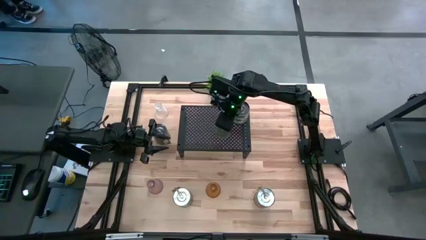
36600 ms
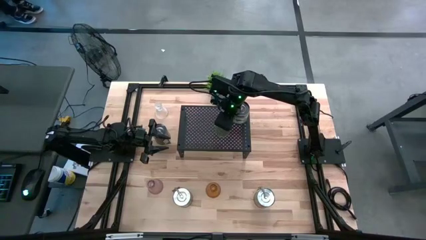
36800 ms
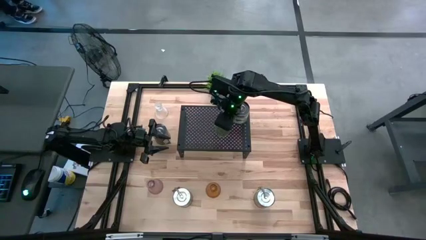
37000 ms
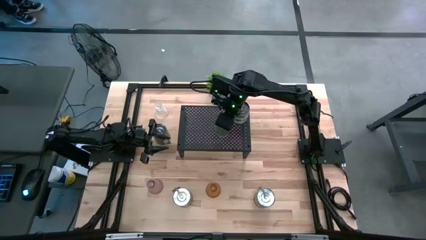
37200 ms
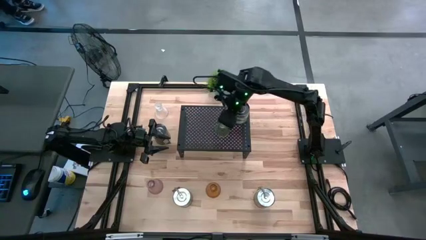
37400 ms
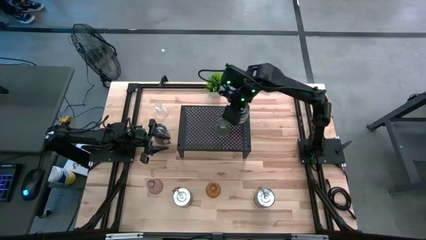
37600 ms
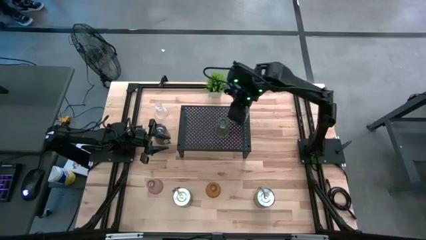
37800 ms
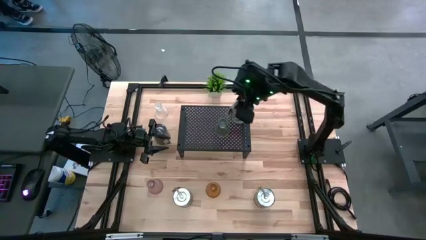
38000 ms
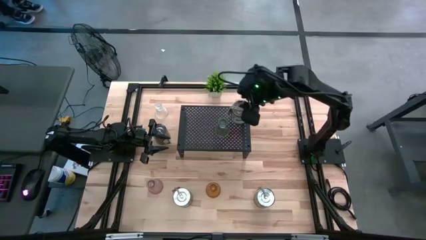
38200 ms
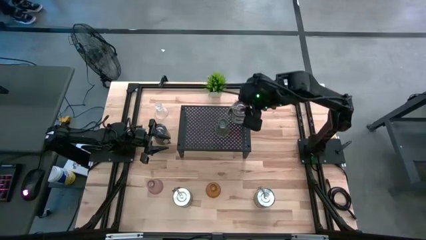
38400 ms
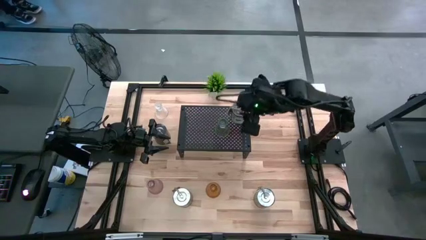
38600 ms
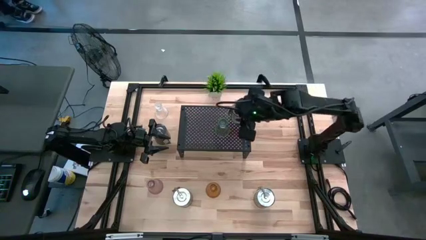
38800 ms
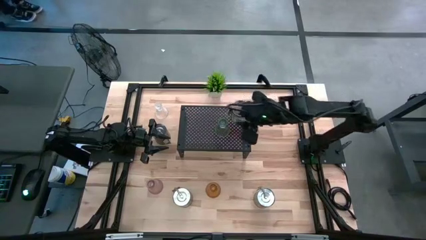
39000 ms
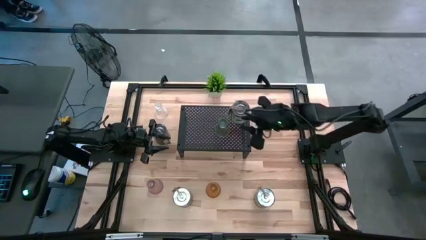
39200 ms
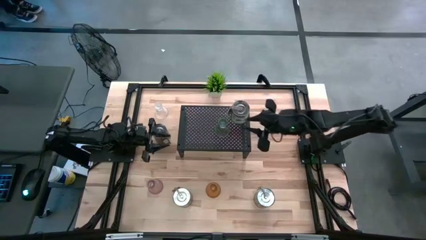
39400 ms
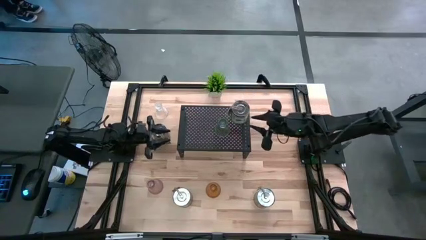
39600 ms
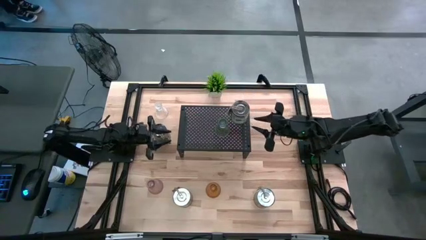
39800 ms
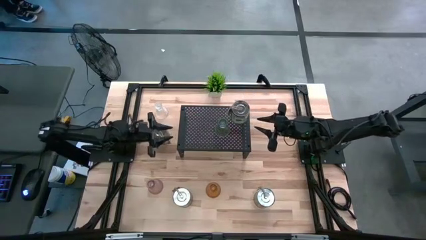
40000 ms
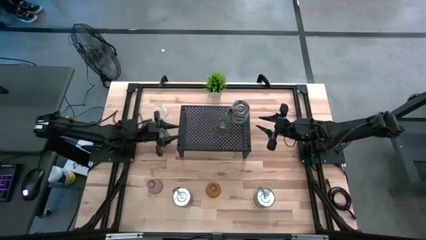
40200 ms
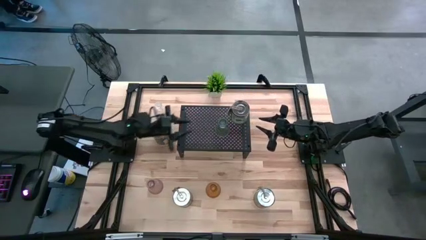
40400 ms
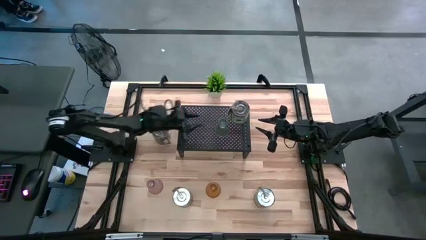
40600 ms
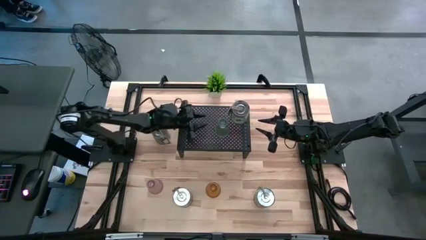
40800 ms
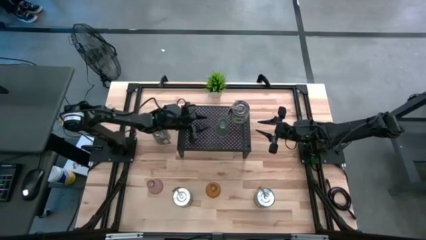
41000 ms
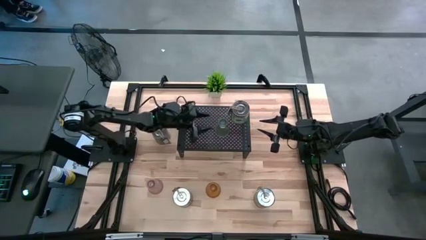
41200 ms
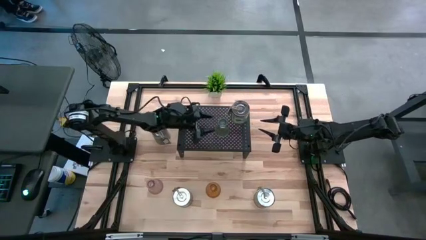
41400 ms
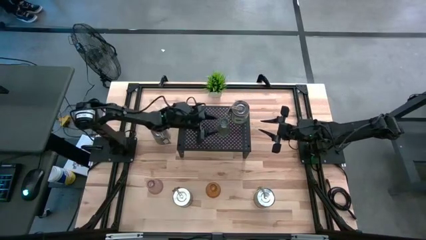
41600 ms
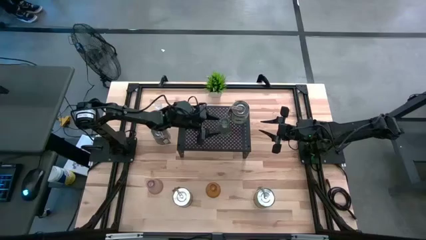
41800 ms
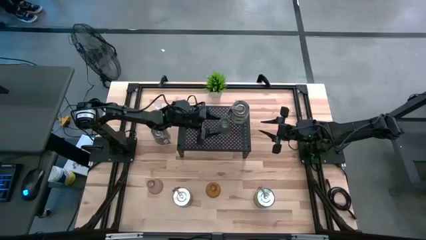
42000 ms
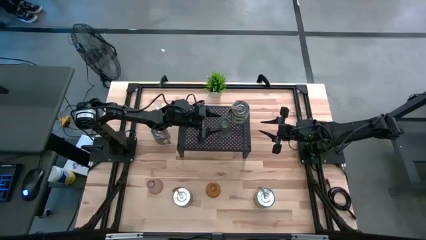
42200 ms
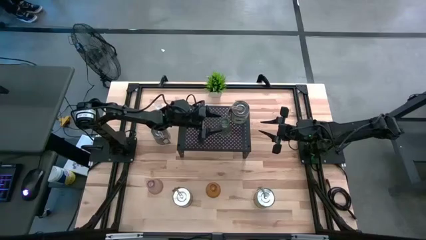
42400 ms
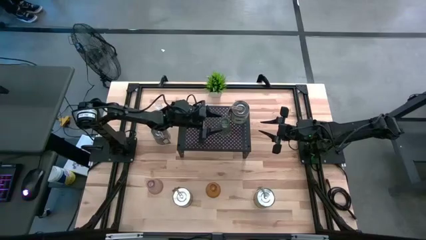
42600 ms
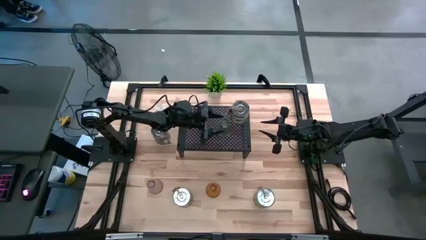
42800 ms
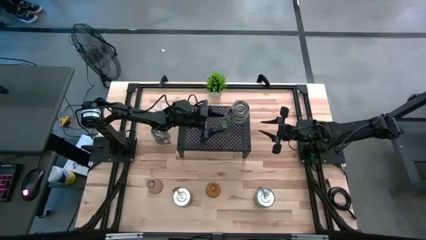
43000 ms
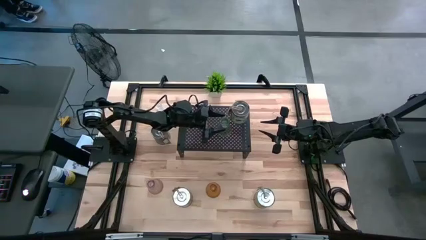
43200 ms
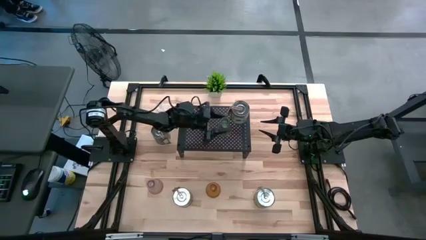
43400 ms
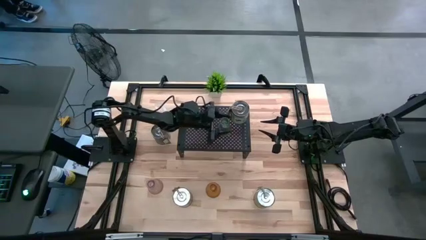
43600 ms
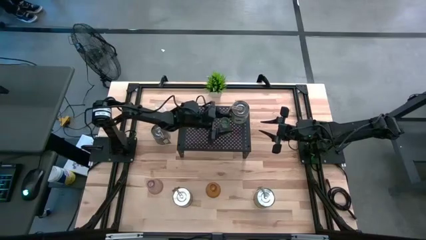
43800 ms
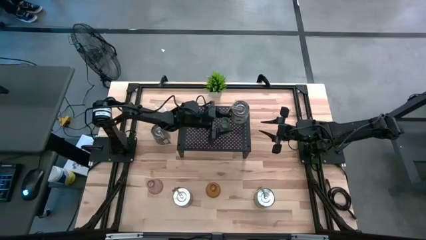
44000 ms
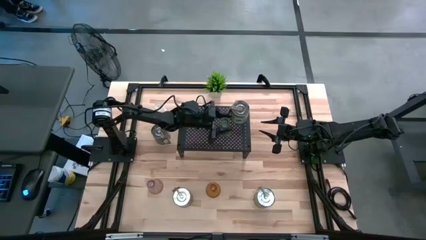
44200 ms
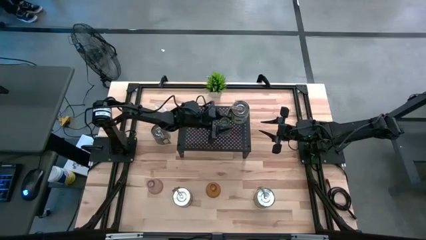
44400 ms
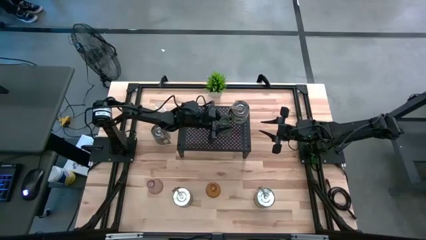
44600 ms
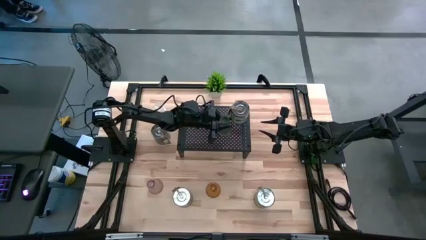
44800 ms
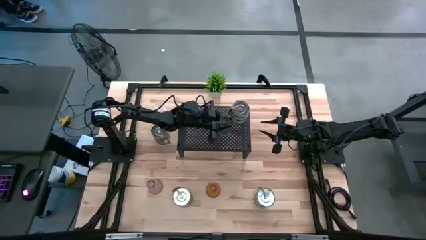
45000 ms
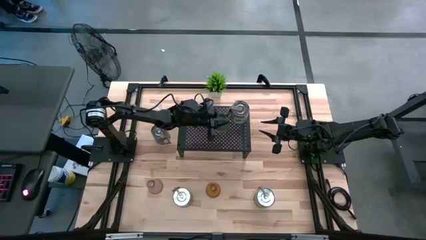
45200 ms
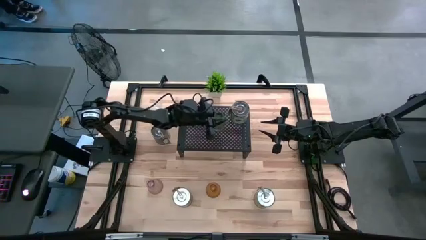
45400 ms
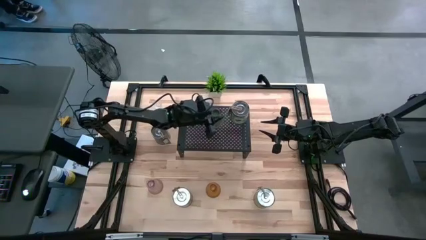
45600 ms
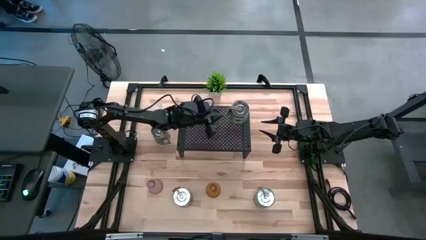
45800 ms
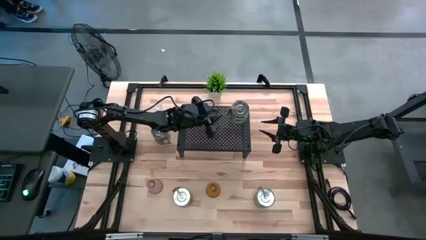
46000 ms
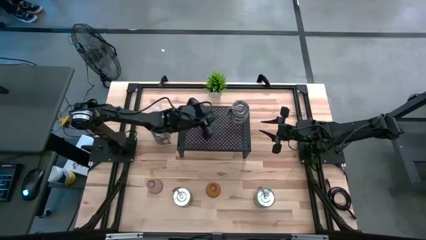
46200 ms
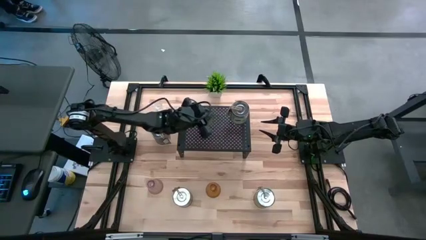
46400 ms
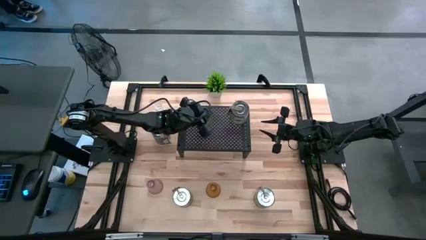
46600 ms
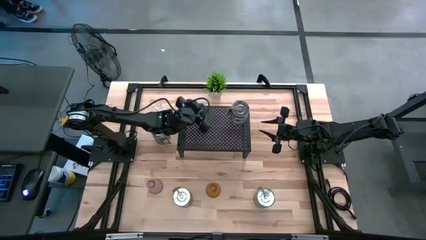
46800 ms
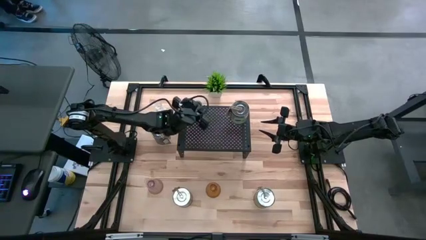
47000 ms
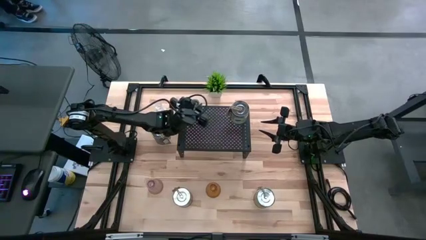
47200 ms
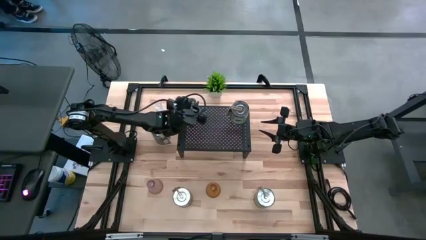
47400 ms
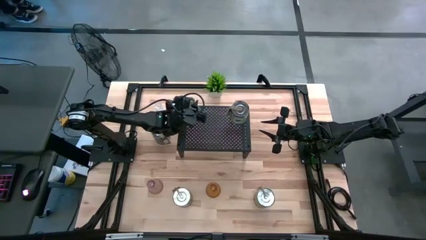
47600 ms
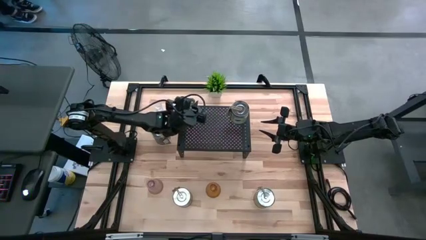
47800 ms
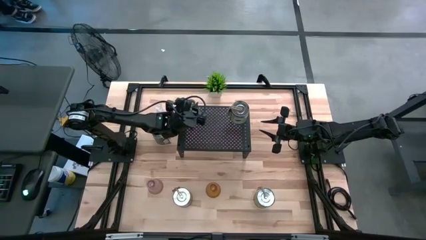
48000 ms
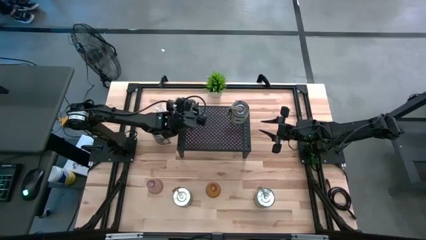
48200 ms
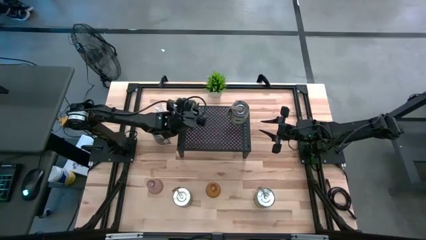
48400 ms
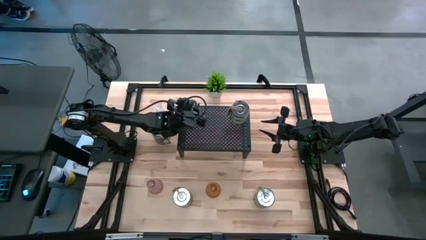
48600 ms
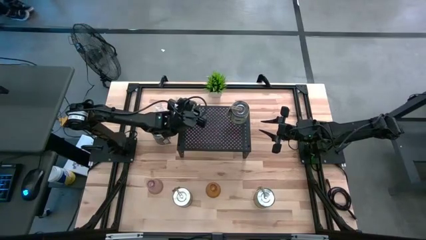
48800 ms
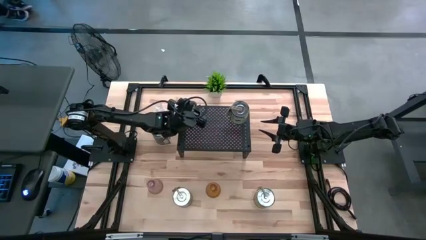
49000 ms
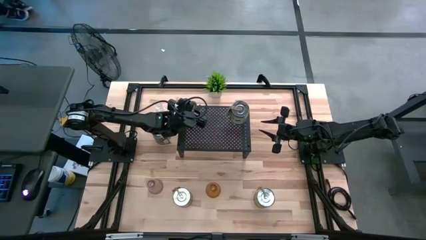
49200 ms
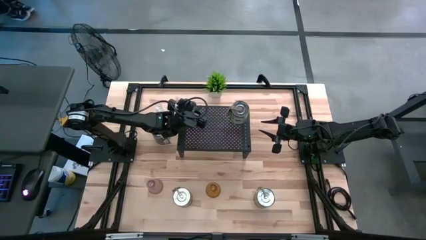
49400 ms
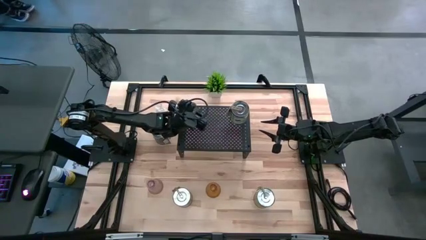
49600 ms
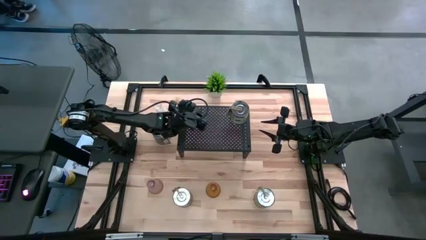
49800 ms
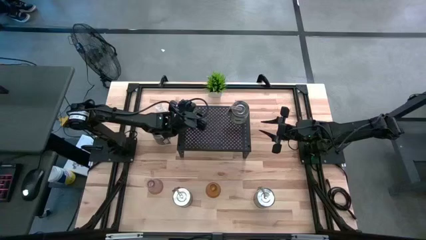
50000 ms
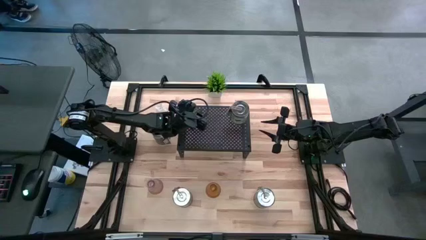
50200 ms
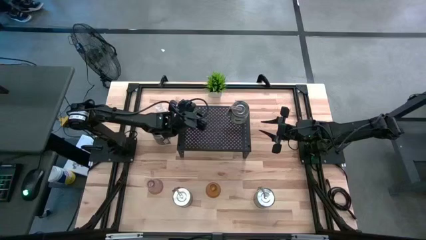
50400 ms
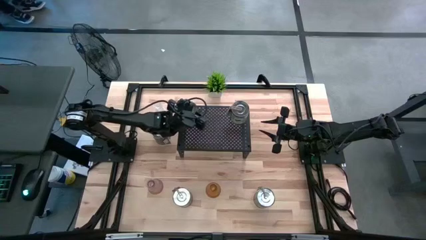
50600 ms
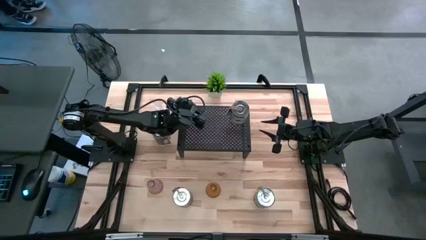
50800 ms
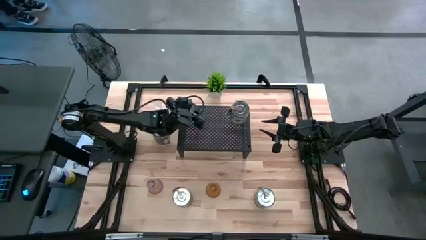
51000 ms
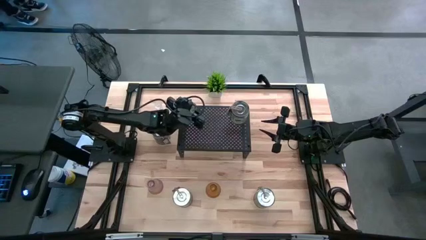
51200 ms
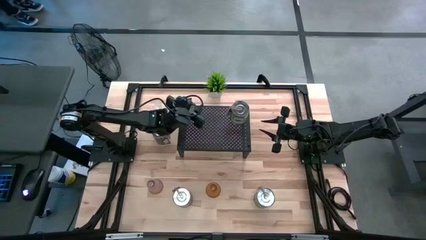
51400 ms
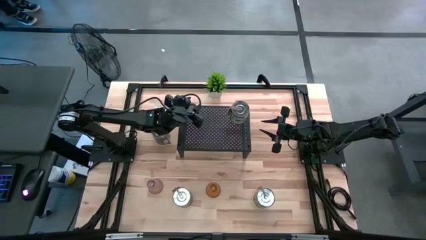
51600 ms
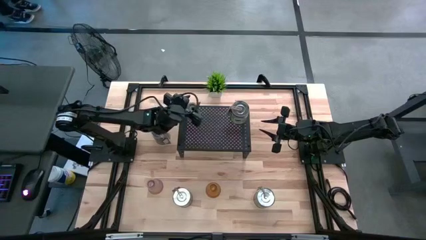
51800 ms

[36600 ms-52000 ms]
Task: Pick & Place candle stick holders
Put the green glass candle holder on the shelf
